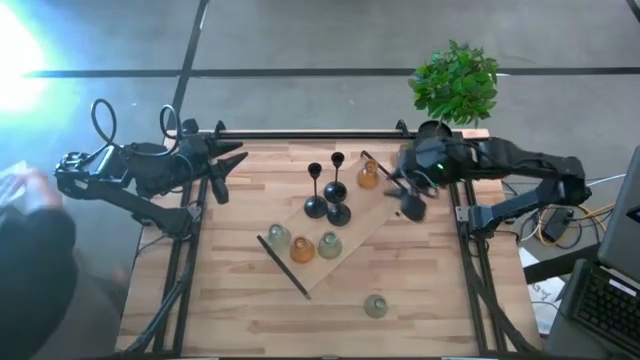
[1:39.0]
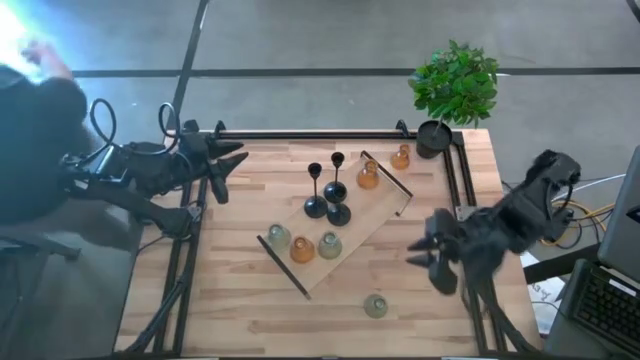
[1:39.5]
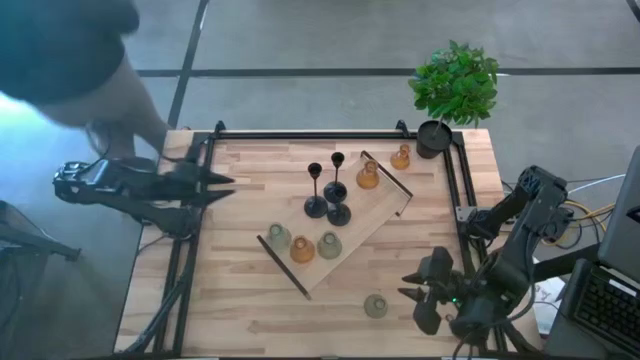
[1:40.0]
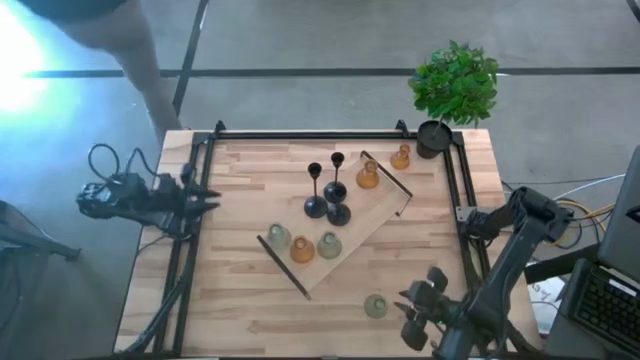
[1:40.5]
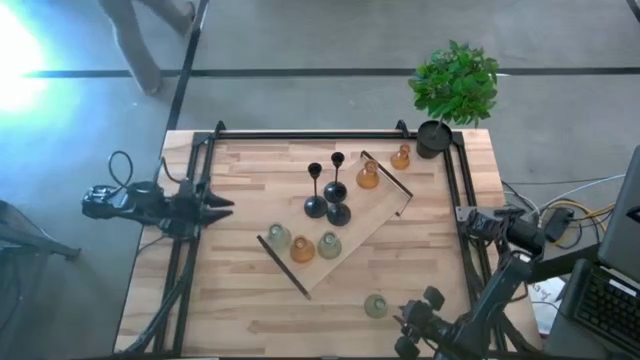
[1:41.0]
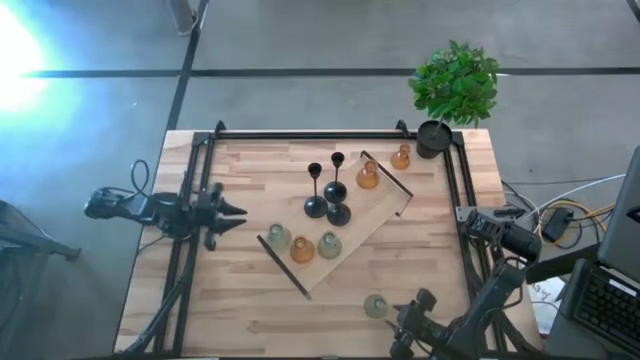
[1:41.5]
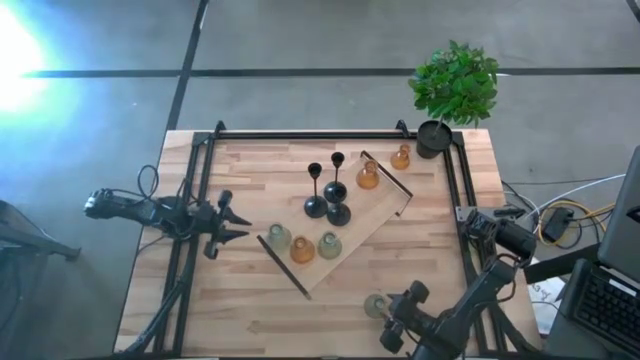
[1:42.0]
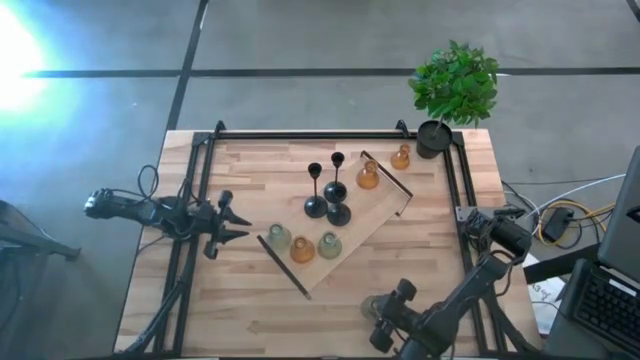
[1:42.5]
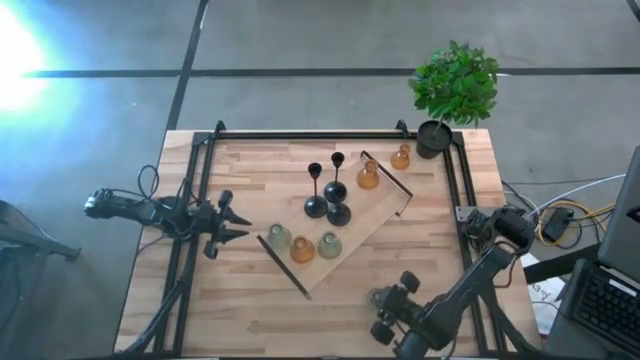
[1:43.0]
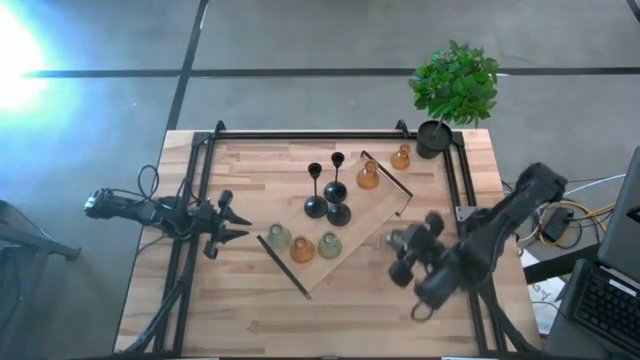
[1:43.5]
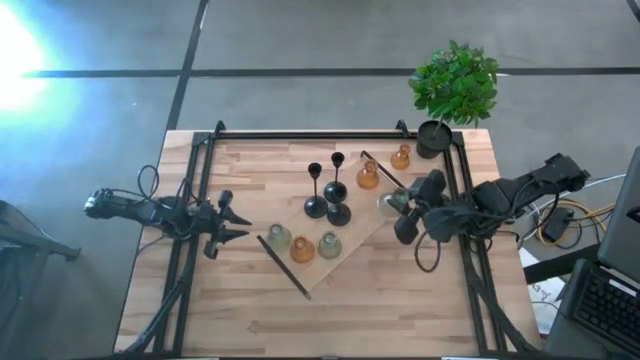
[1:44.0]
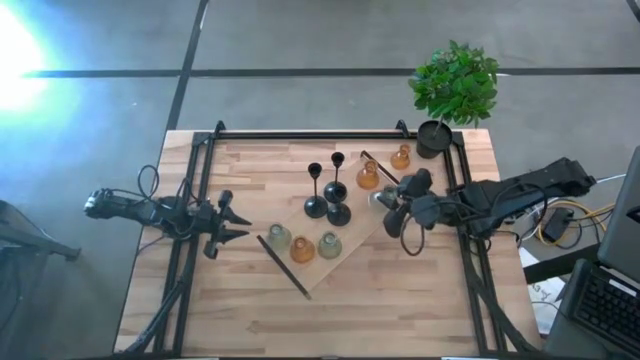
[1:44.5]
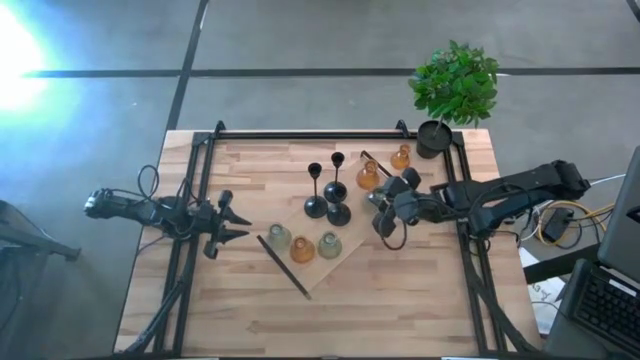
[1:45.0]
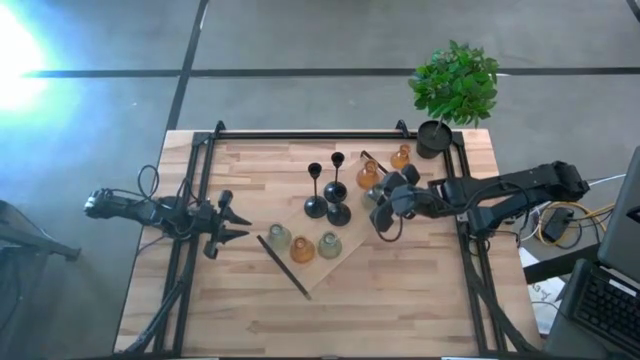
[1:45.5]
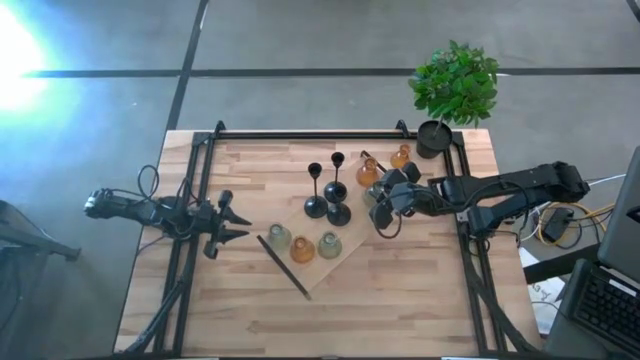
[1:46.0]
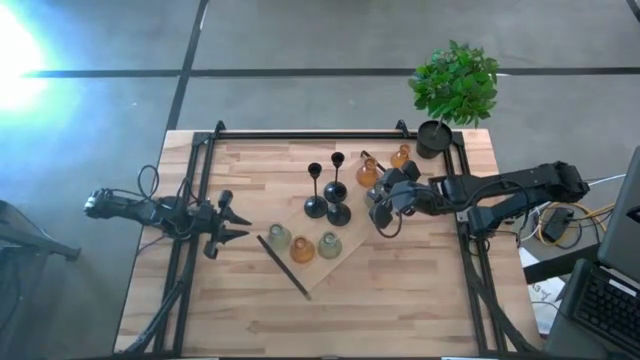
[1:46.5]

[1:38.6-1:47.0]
Task: Pick & Place candle stick holders
Put the green candle holder on the shelf

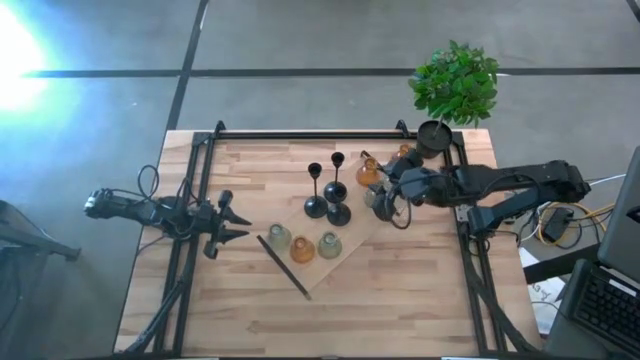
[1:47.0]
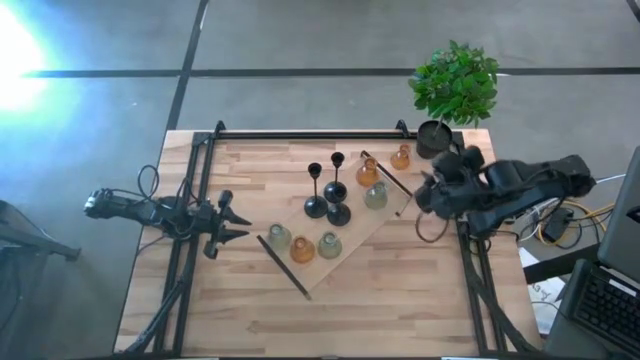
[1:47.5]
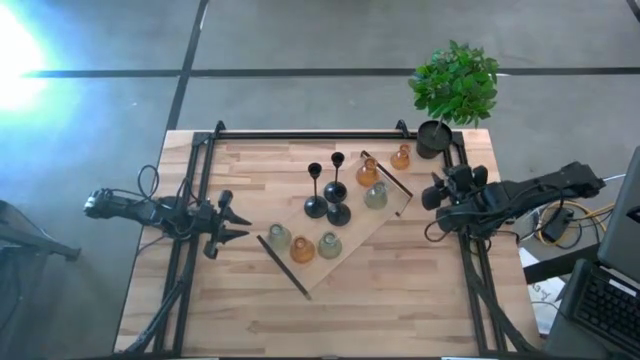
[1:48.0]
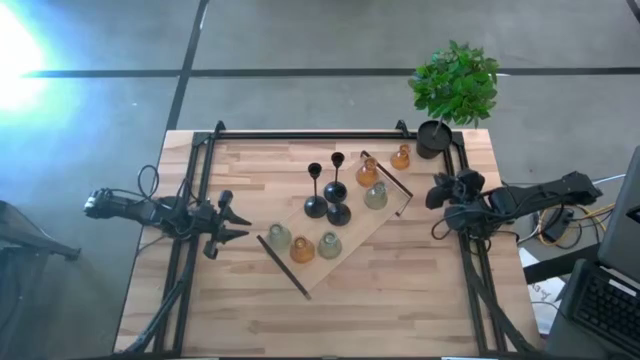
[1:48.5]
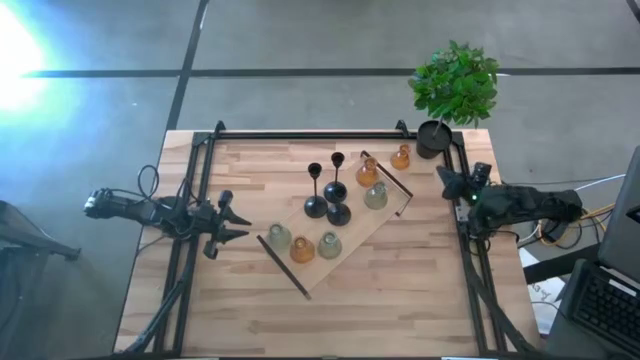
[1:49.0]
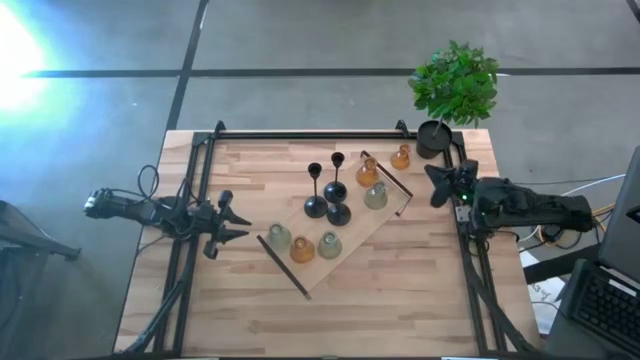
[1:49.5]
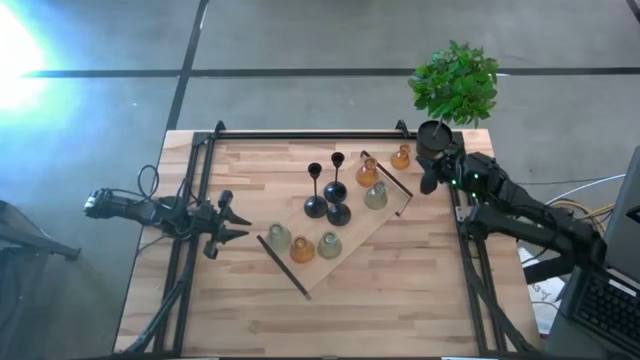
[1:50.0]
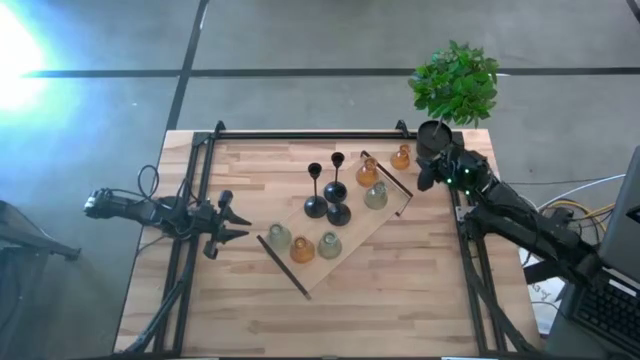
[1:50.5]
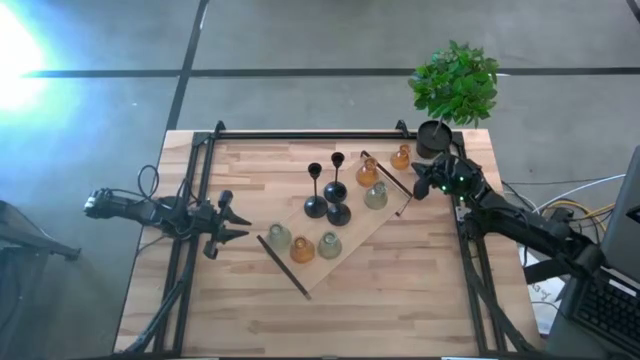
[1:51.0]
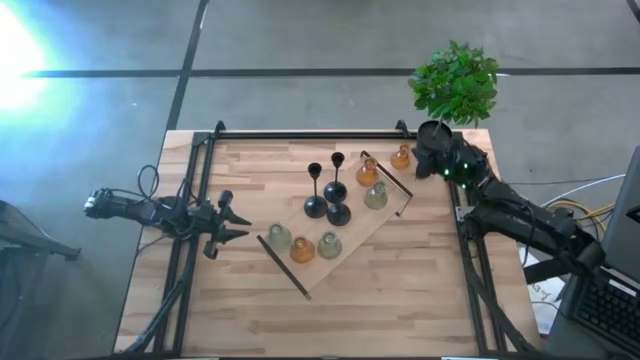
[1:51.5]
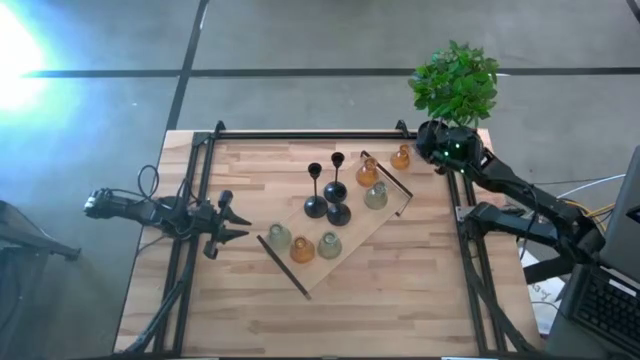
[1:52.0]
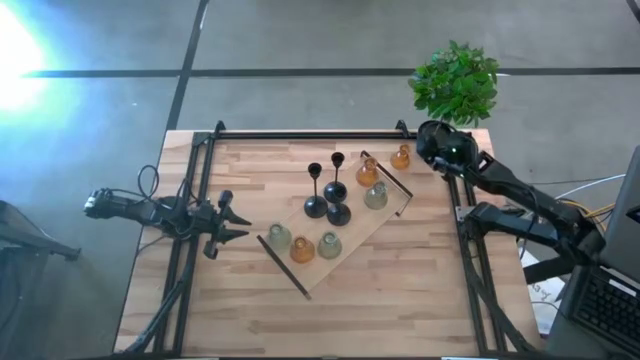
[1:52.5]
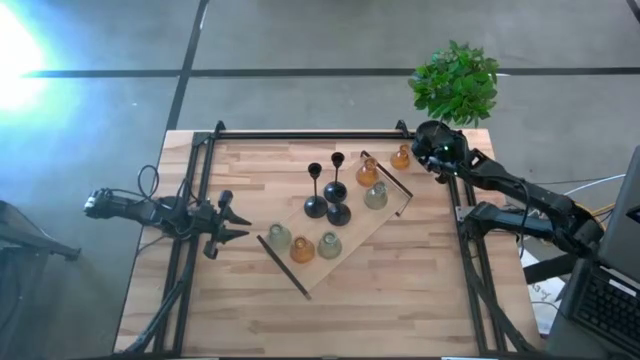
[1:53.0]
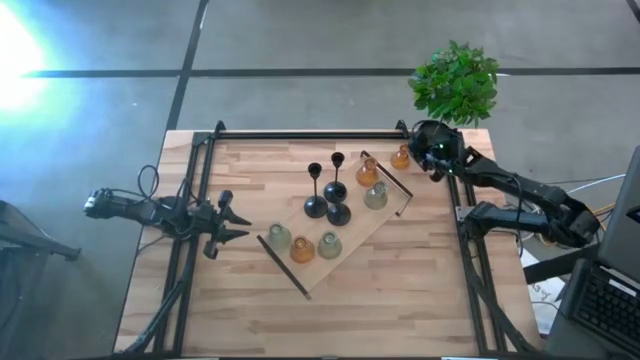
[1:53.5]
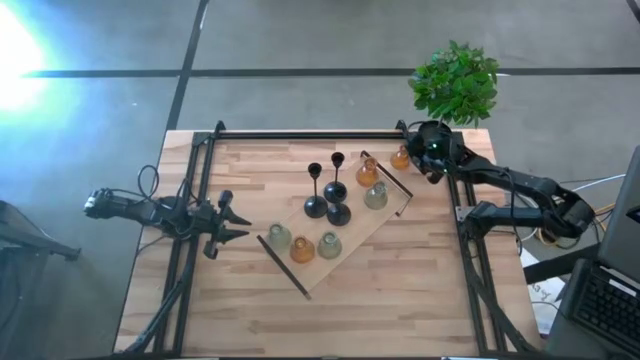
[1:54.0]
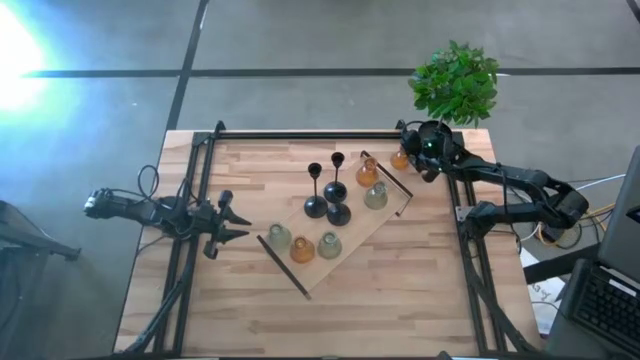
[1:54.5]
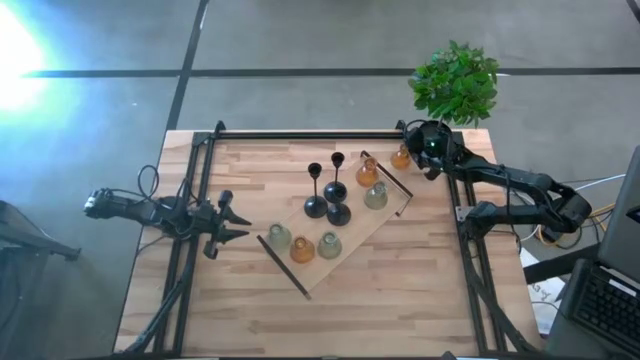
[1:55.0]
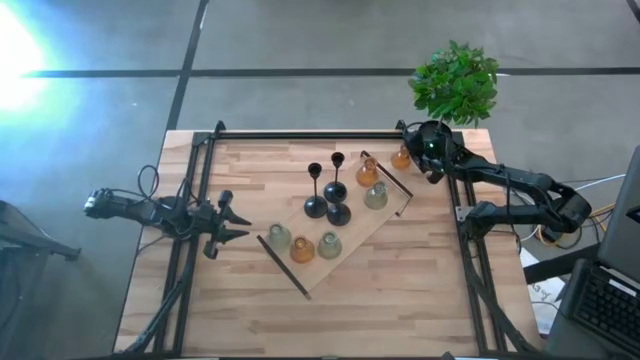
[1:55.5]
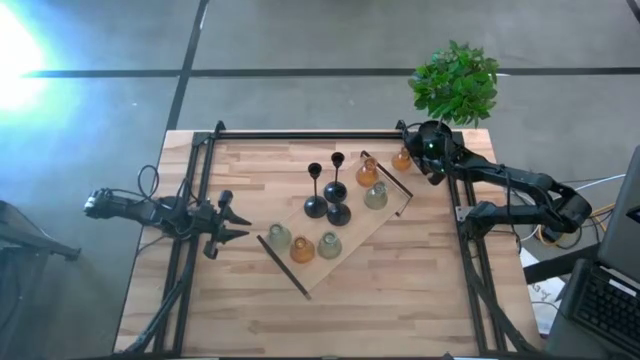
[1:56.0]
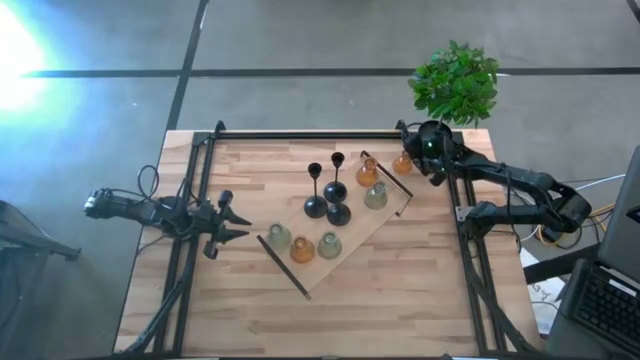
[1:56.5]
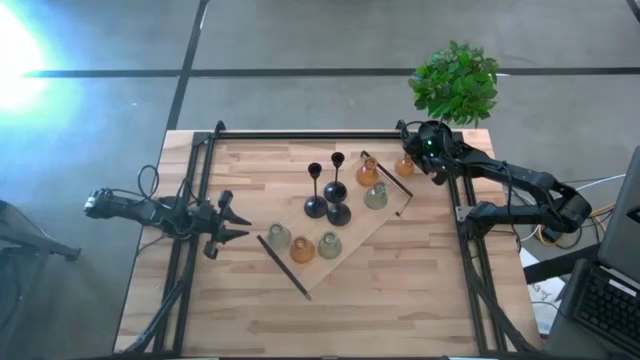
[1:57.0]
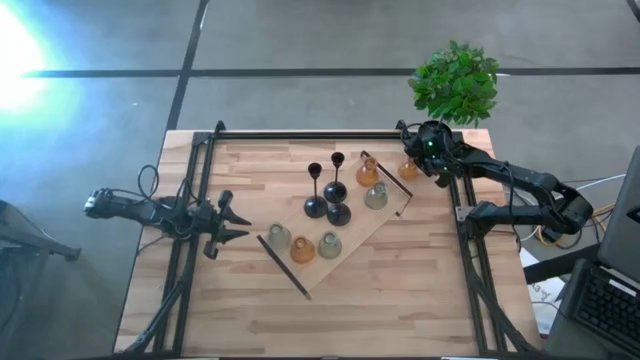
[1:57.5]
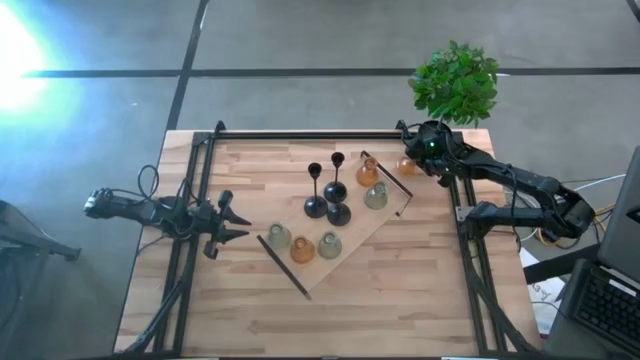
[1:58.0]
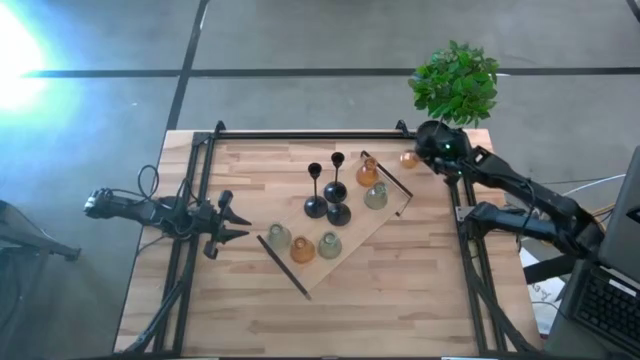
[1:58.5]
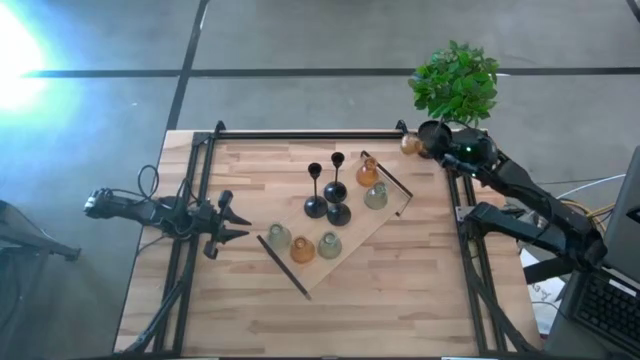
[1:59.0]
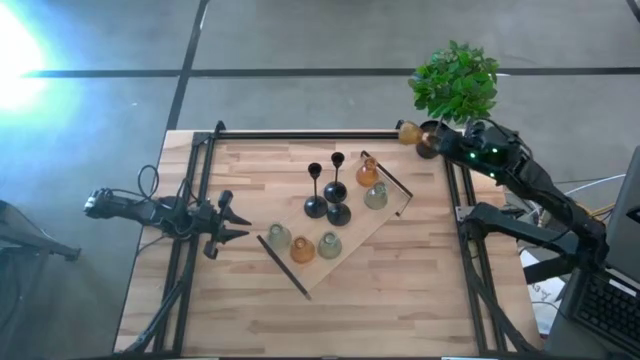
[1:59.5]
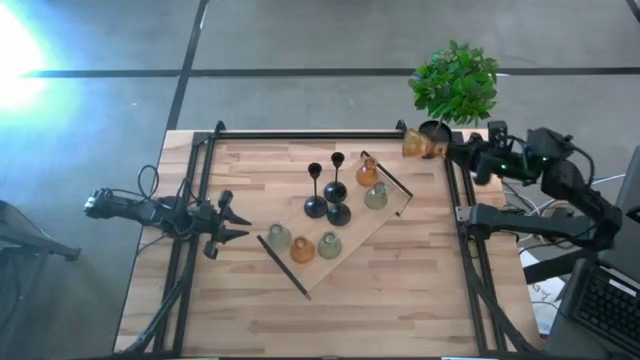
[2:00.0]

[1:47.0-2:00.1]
Put the yellow candle holder on the shelf
